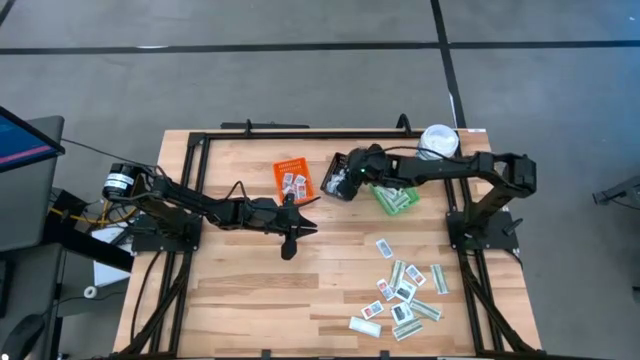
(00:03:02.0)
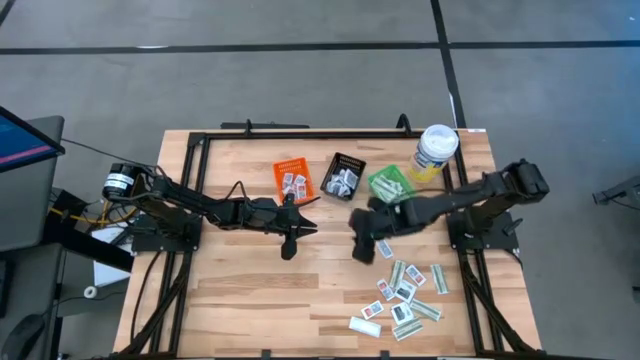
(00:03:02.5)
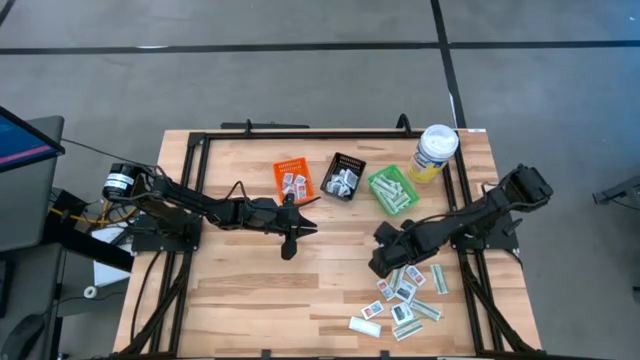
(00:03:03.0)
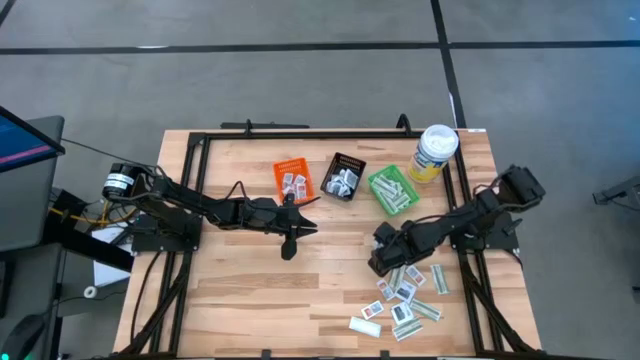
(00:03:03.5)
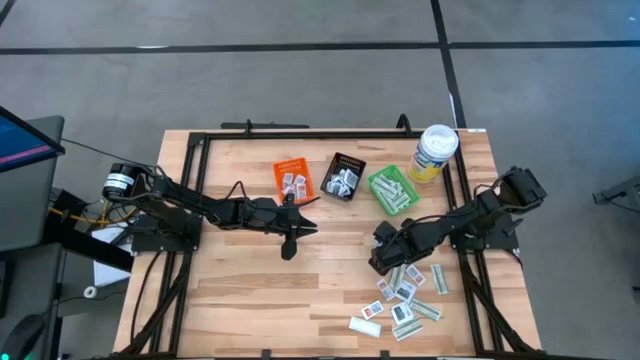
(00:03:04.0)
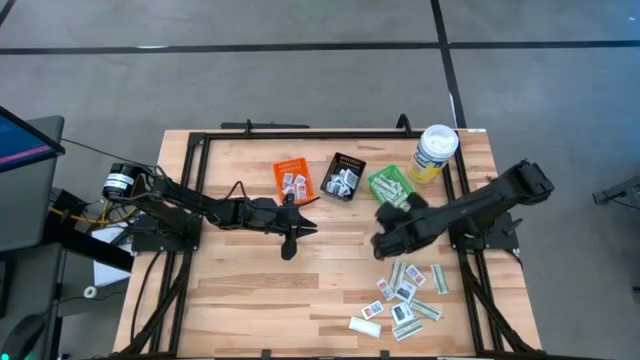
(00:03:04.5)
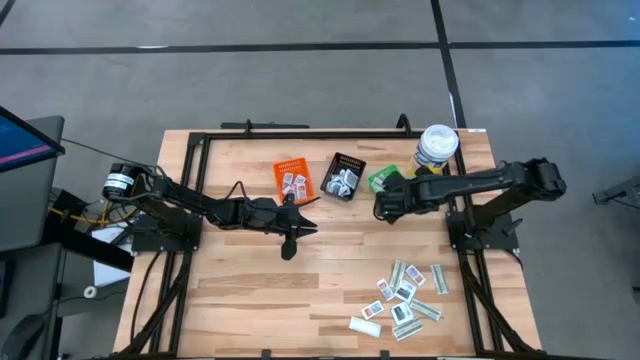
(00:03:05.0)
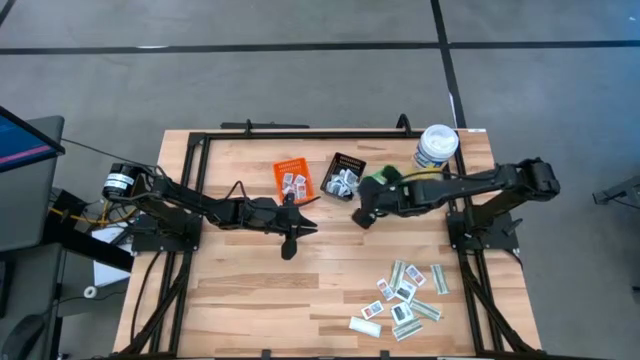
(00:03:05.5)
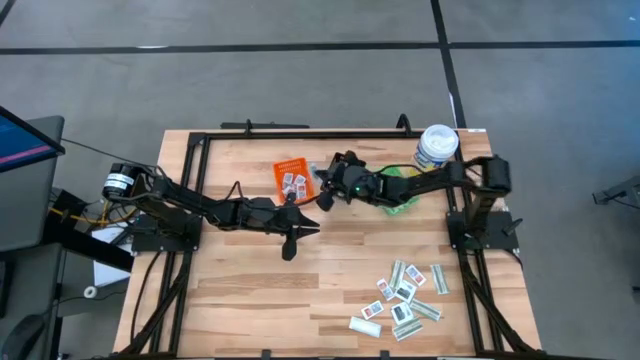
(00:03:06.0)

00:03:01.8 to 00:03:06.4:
Task: Pick & Place First Aid Supplies
Put the orange ointment pack into the orange basket

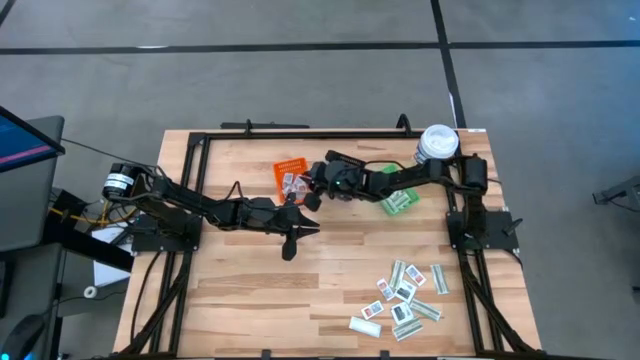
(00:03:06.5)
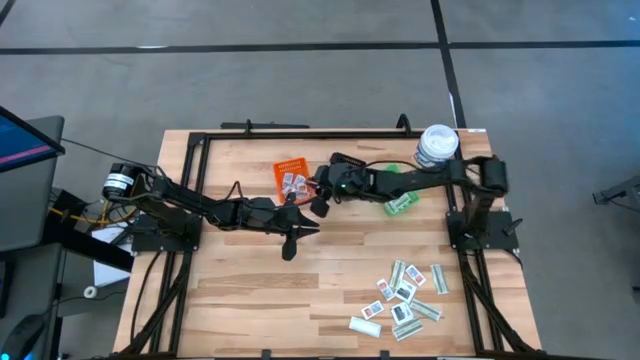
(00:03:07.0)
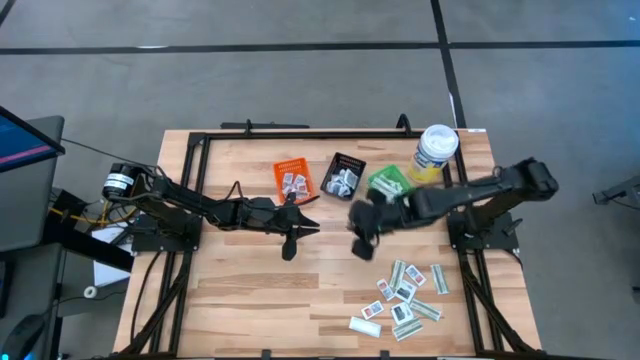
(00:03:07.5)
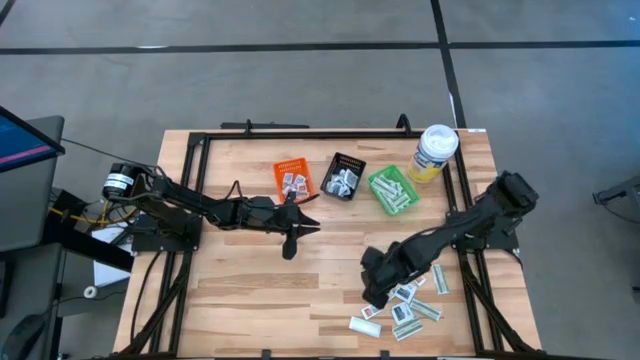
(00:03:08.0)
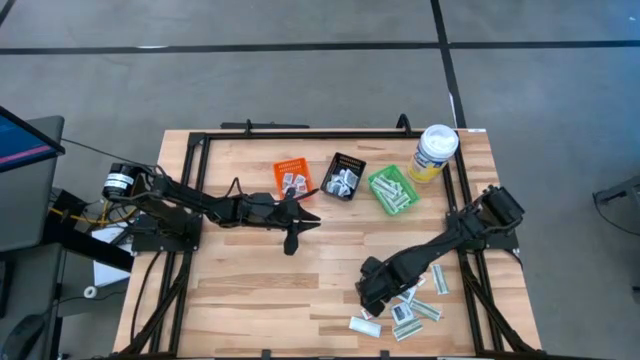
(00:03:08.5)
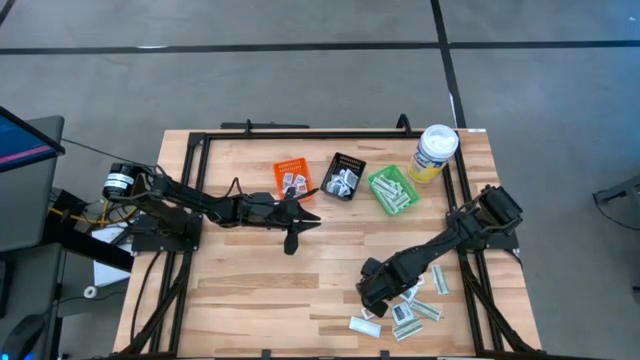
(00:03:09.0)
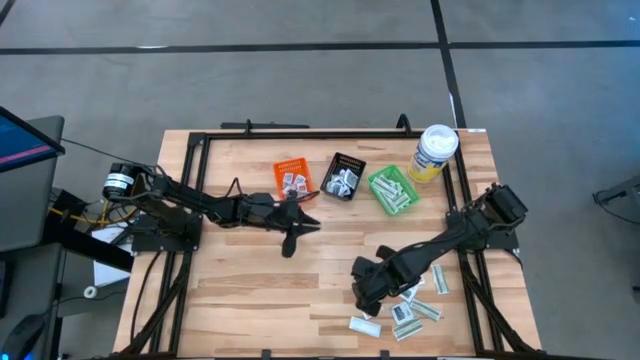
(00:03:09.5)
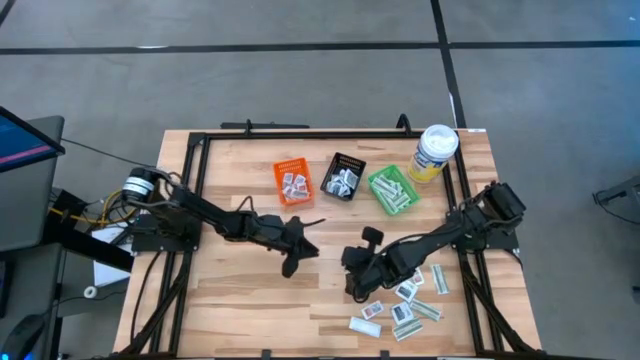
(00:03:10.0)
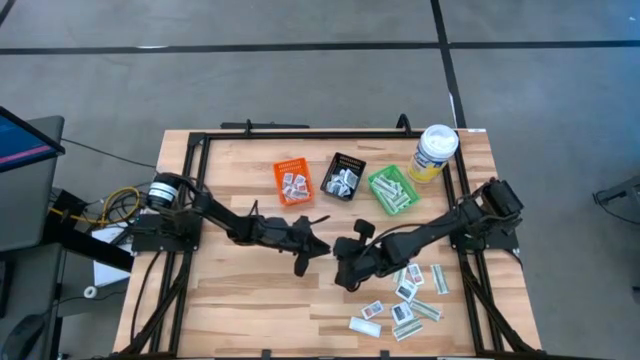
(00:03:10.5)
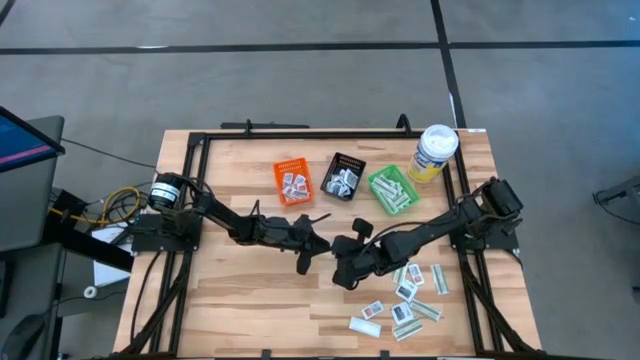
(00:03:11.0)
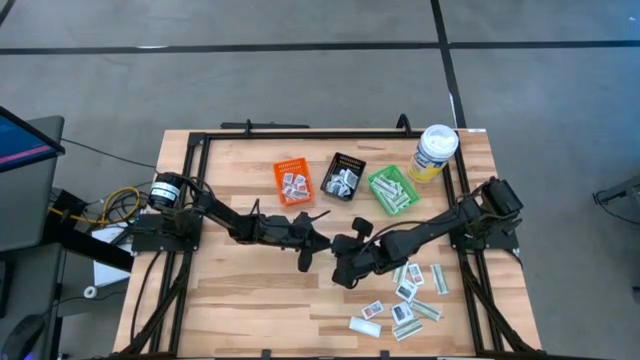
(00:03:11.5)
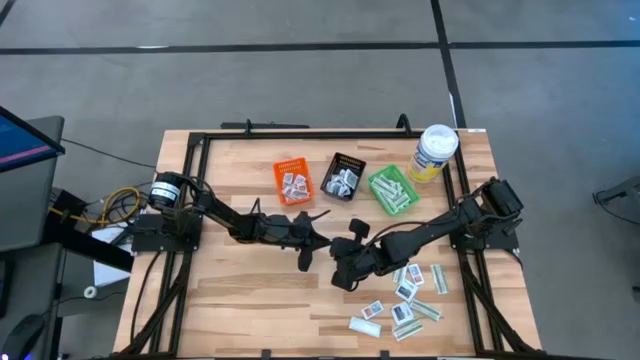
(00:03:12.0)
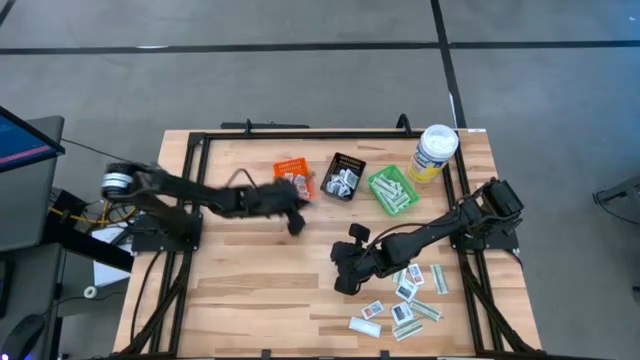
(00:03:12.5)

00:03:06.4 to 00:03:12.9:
Put the orange ointment pack into the orange basket

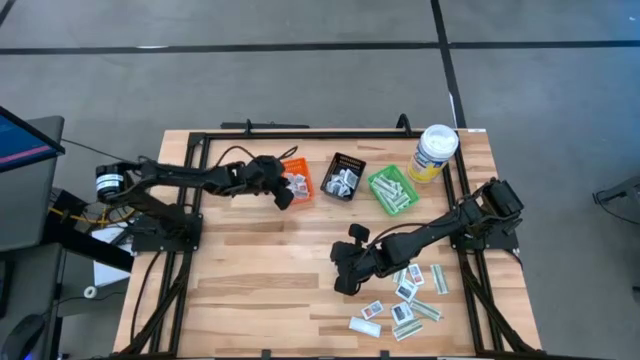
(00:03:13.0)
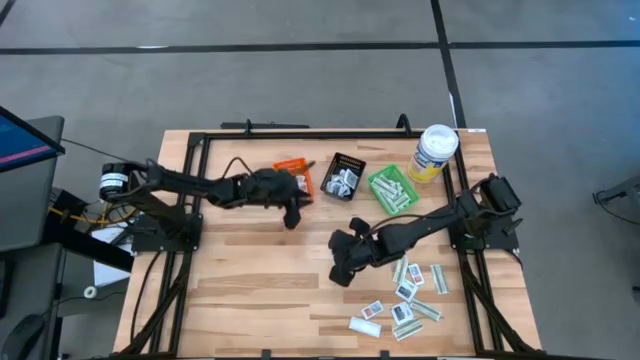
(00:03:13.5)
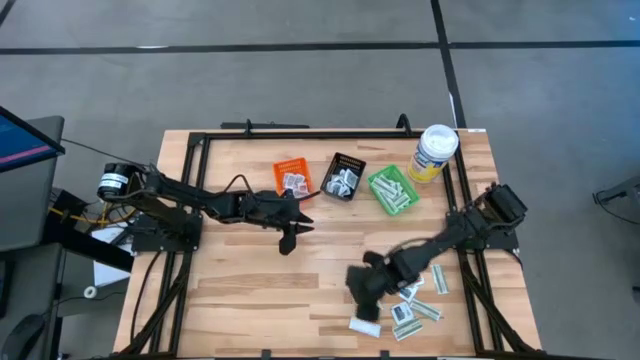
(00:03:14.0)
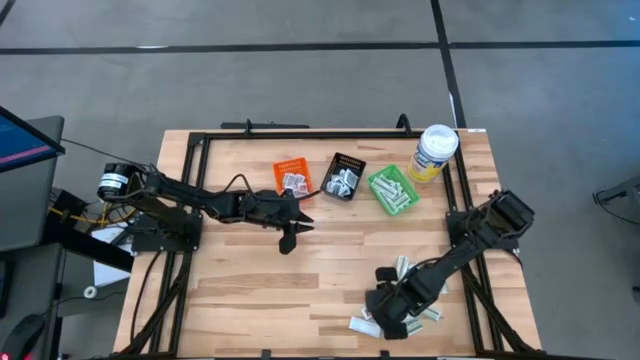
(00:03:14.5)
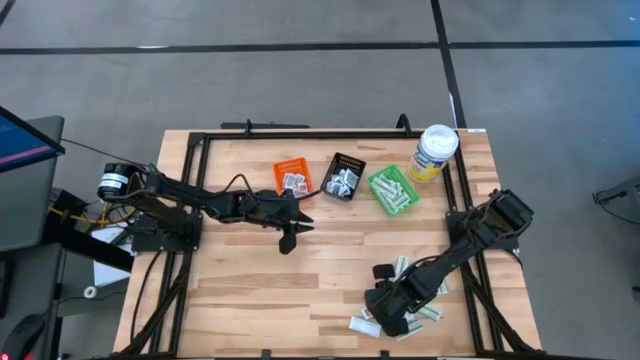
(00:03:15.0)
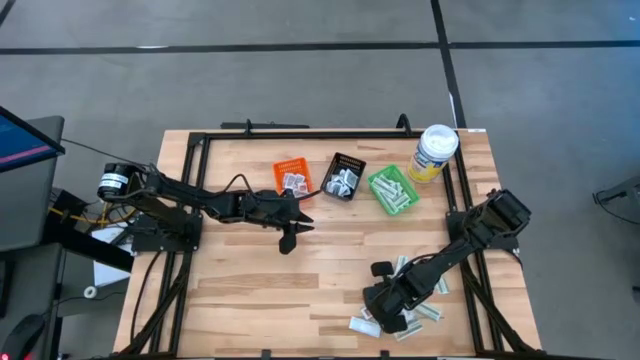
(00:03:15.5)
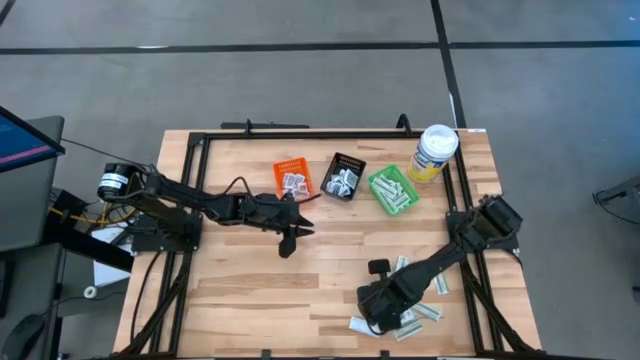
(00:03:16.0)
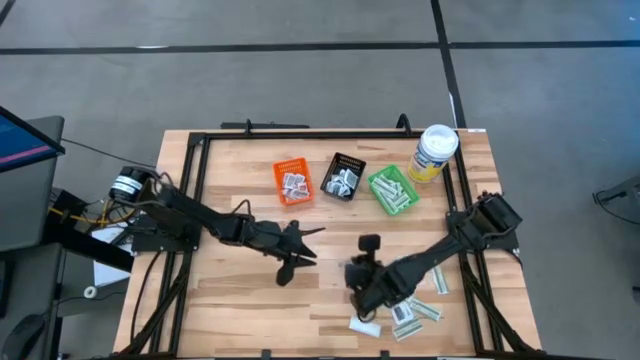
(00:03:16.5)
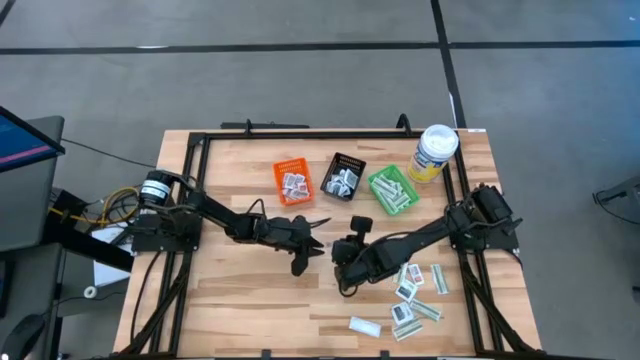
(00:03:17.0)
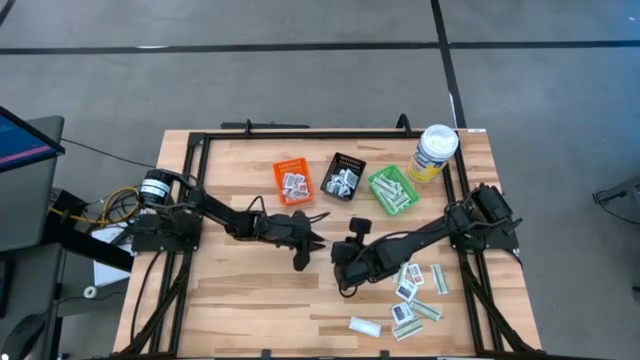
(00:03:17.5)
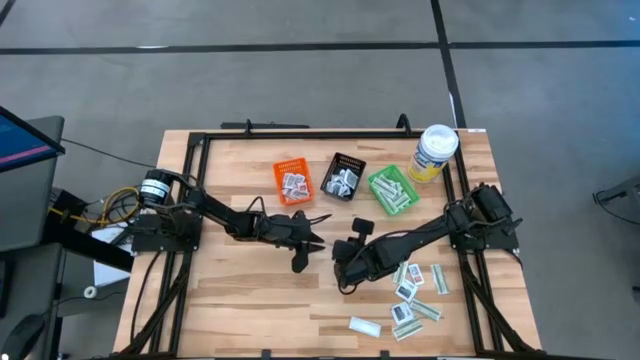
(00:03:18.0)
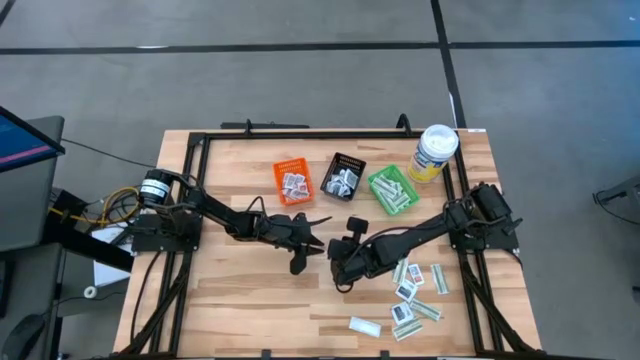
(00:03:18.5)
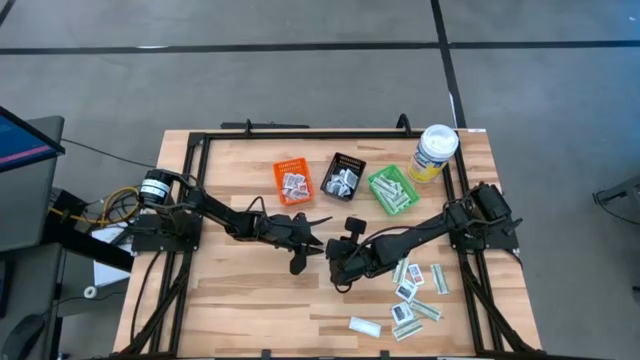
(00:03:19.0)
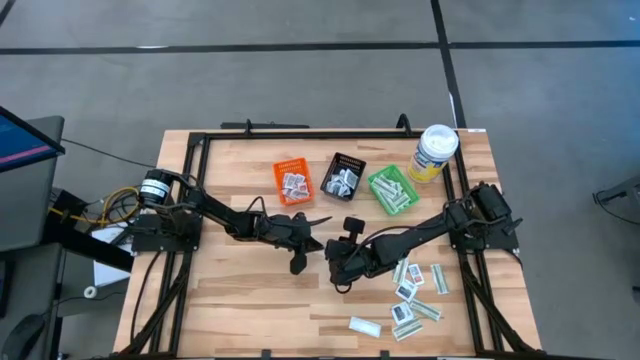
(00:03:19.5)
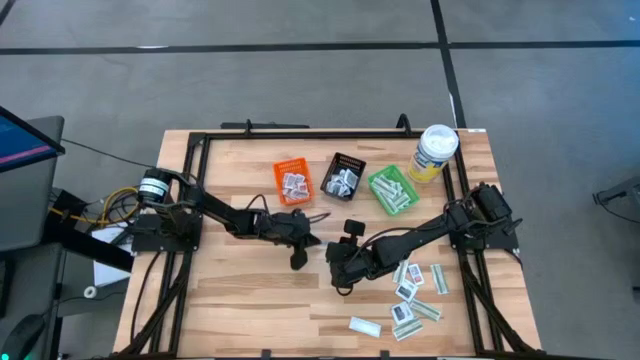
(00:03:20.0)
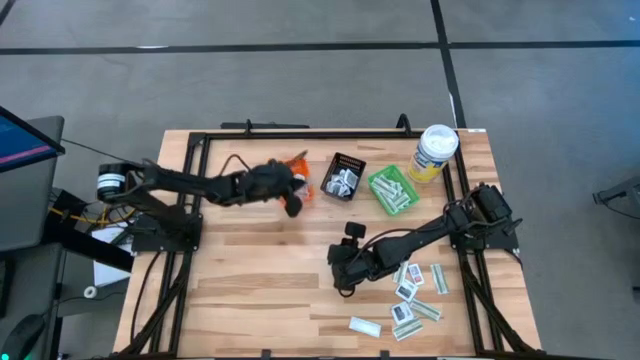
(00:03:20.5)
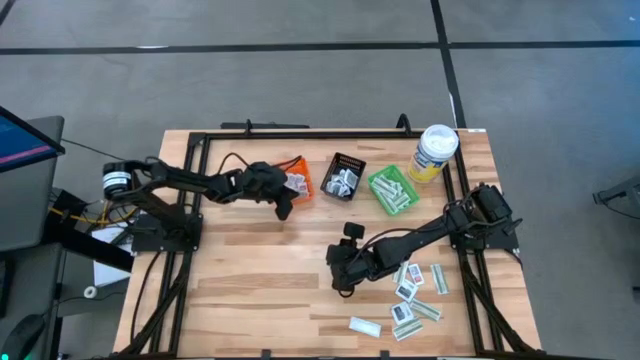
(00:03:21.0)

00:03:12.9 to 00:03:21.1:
Put the orange ointment pack into the orange basket

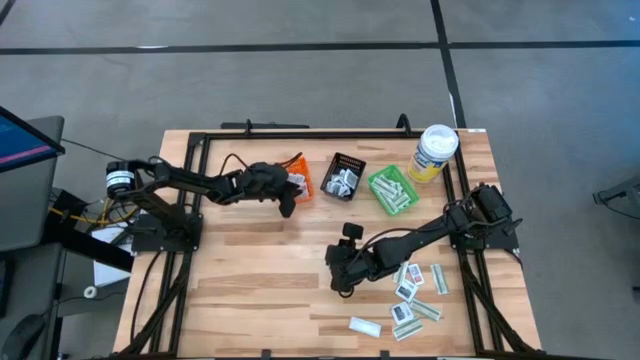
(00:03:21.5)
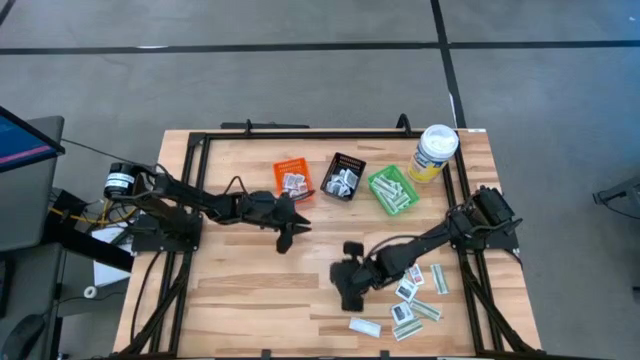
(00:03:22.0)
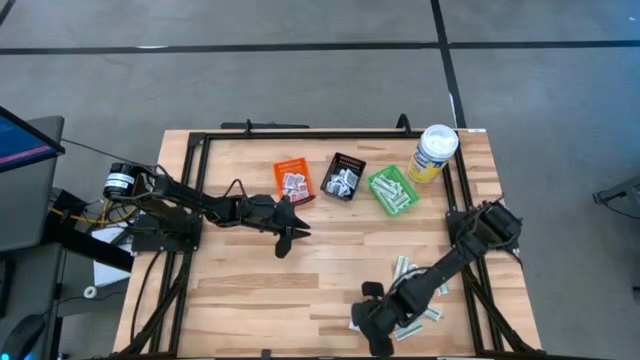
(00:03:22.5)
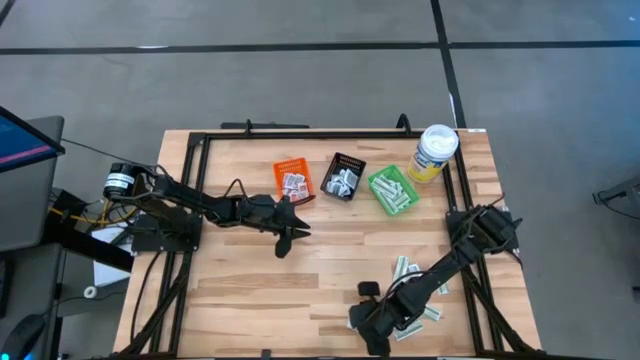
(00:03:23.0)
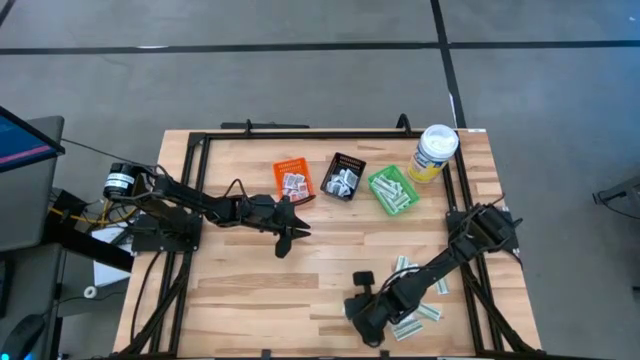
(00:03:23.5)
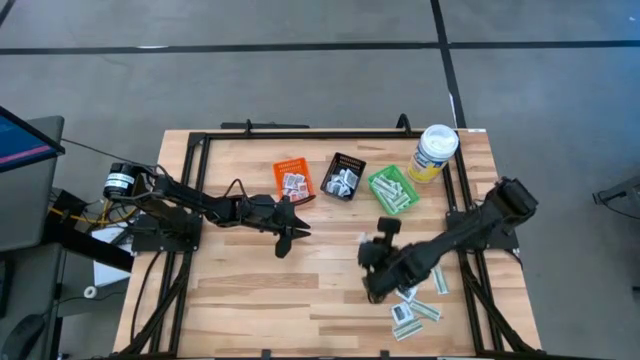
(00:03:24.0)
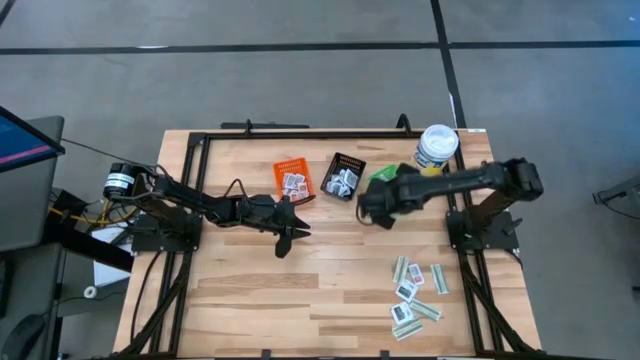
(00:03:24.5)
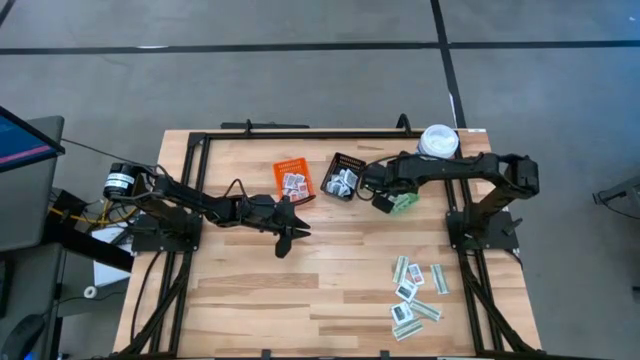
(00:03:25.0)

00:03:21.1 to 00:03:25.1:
Put the orange ointment pack into the orange basket
